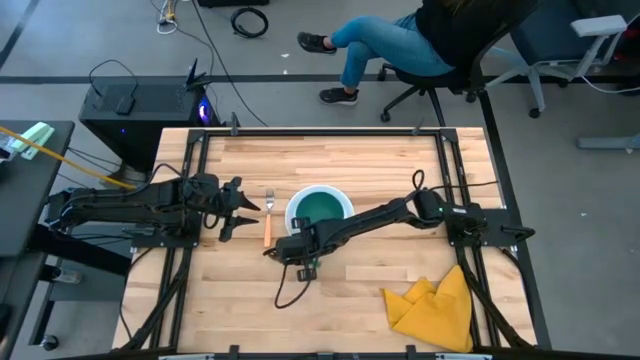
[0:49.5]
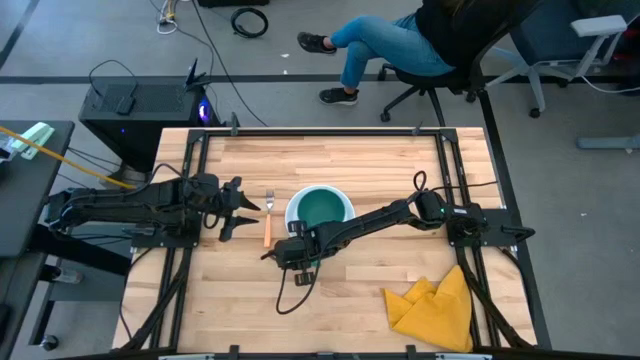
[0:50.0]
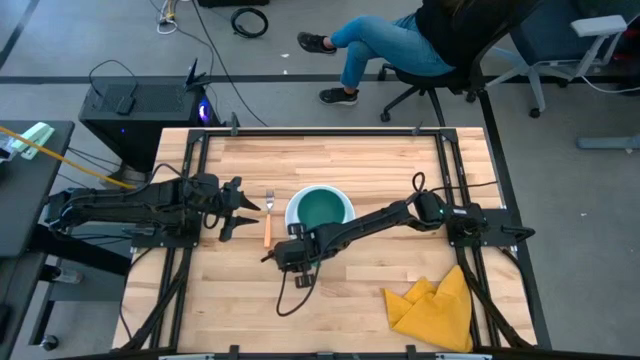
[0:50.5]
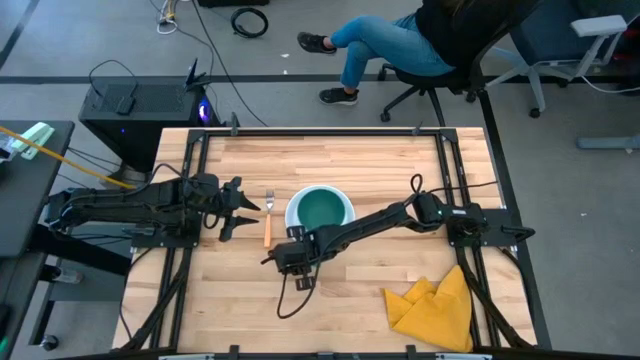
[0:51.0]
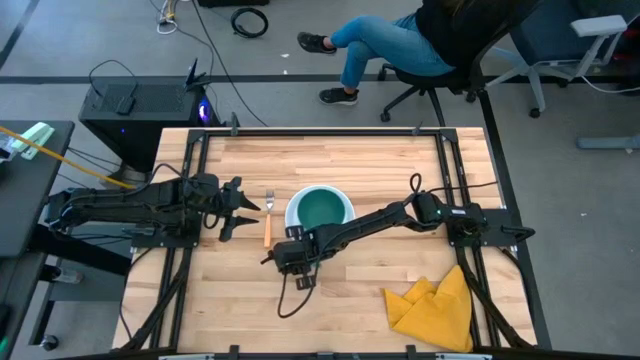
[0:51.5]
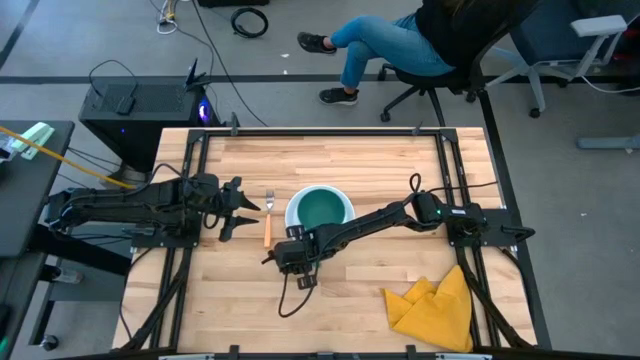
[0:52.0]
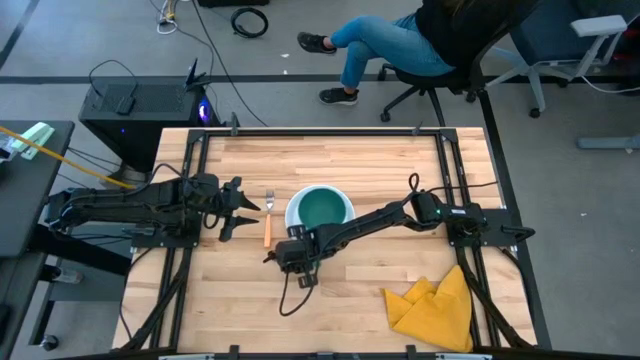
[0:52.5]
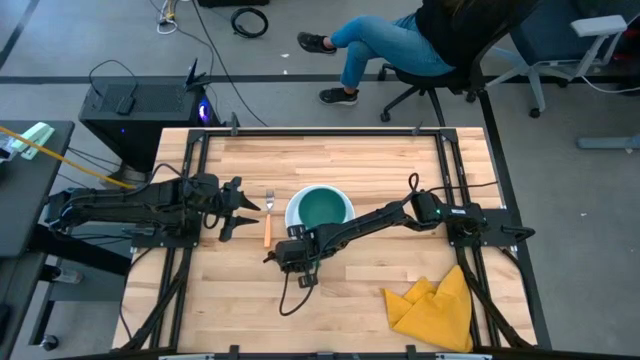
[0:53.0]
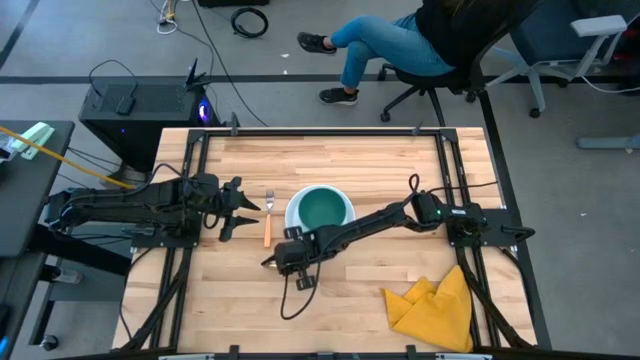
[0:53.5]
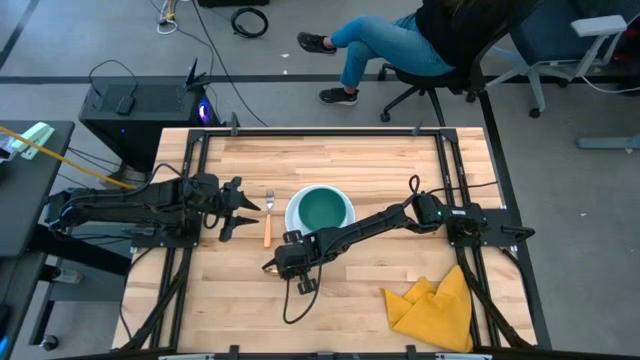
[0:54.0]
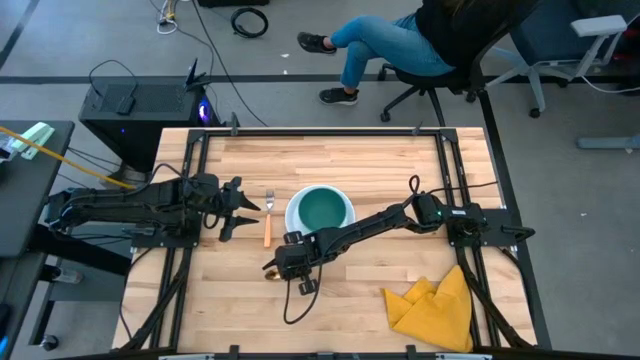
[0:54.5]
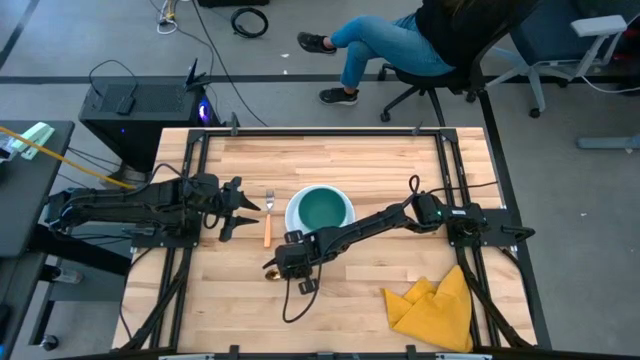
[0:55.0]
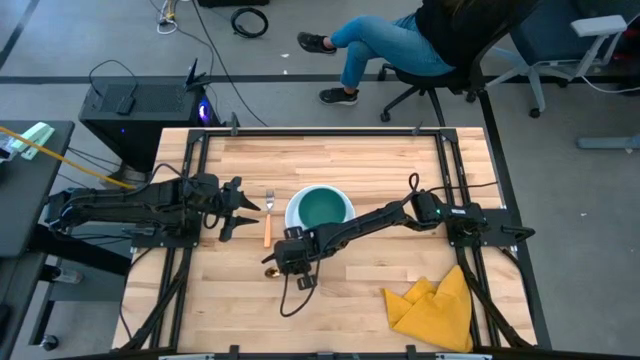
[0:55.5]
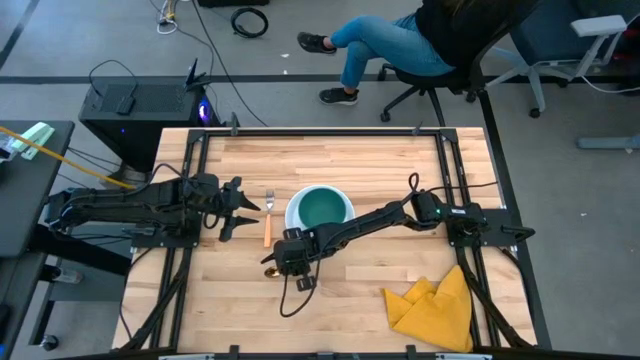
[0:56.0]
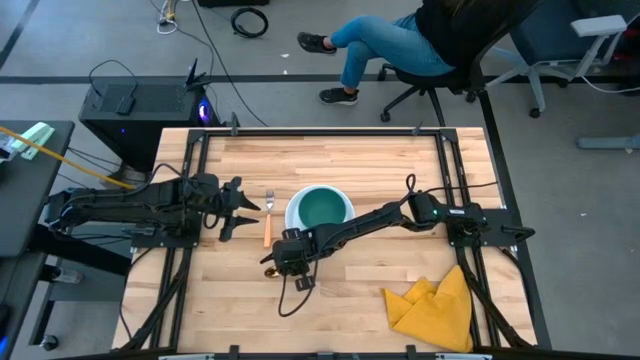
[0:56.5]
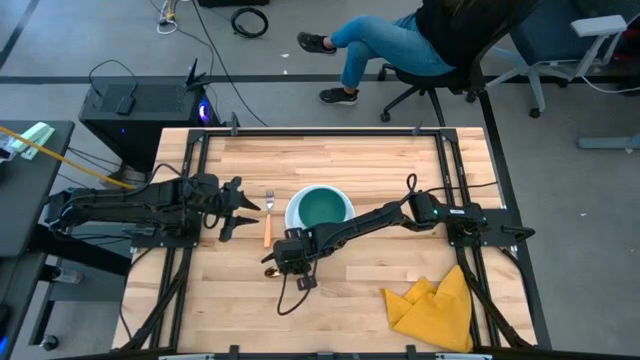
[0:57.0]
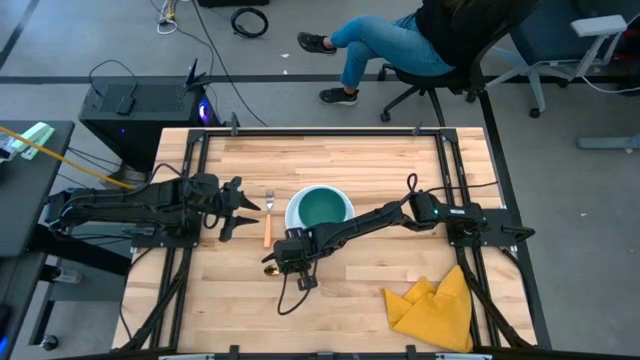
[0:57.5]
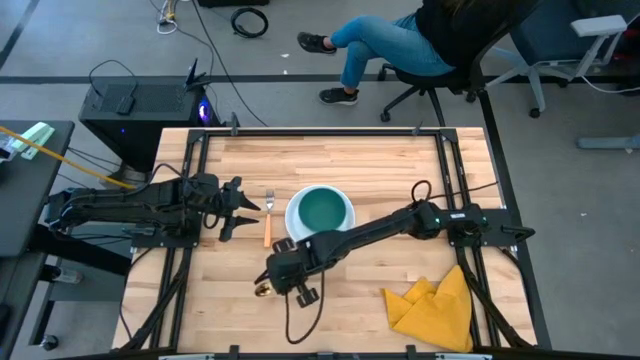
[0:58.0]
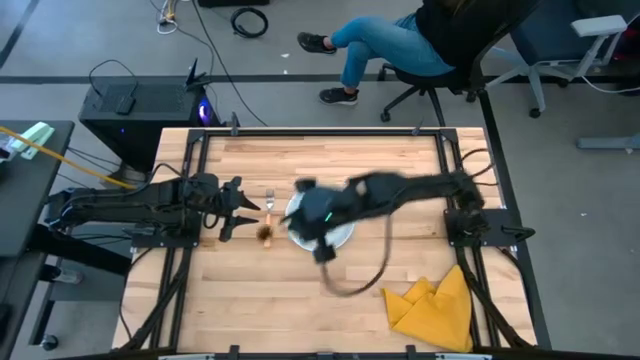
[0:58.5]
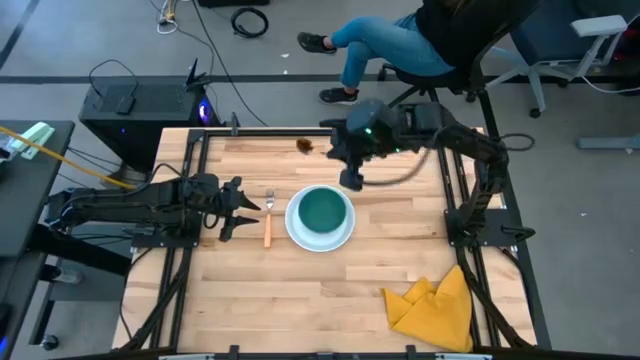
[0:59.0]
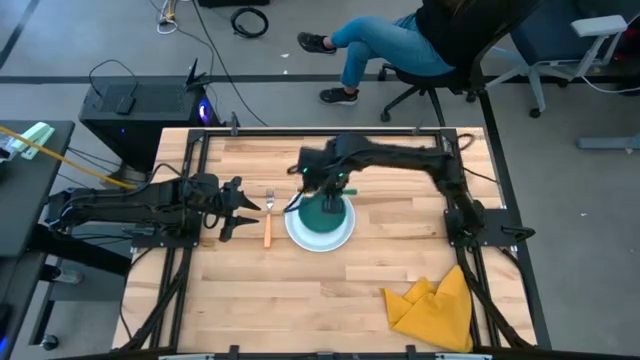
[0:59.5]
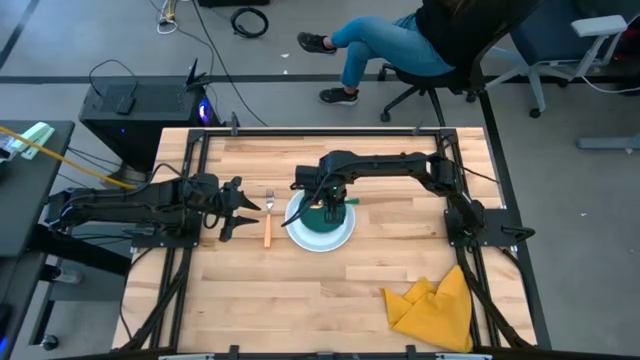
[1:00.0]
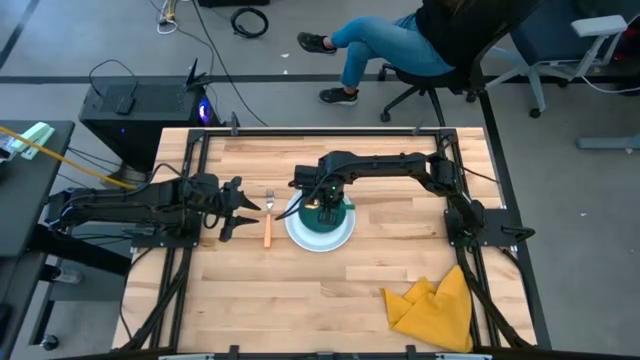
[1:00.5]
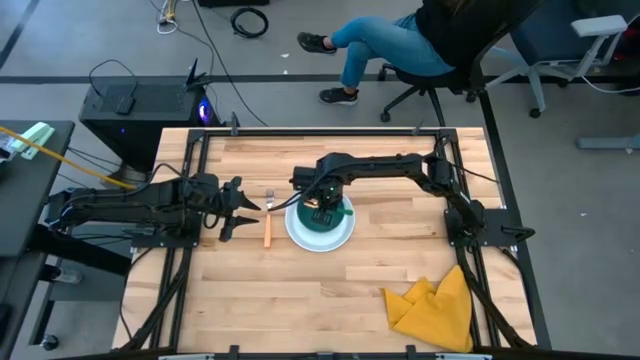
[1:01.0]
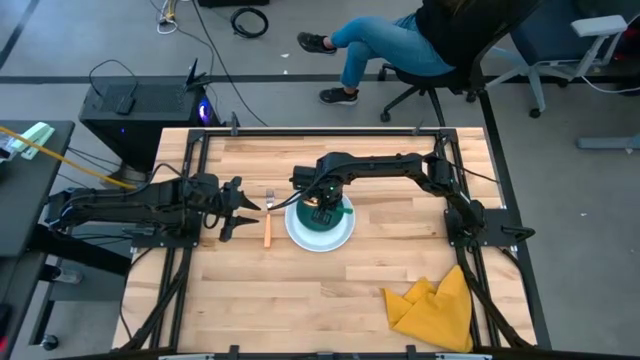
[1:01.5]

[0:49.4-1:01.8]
Task: Set table place
Put the green spoon into the green bowl

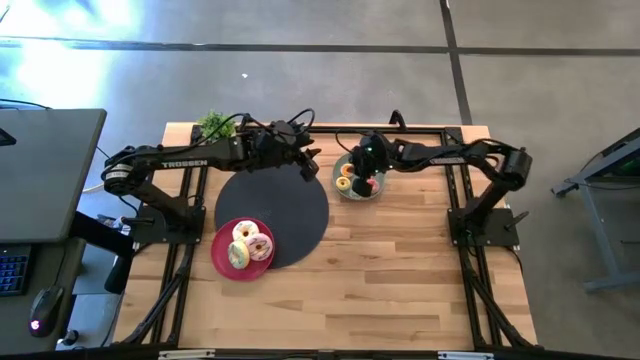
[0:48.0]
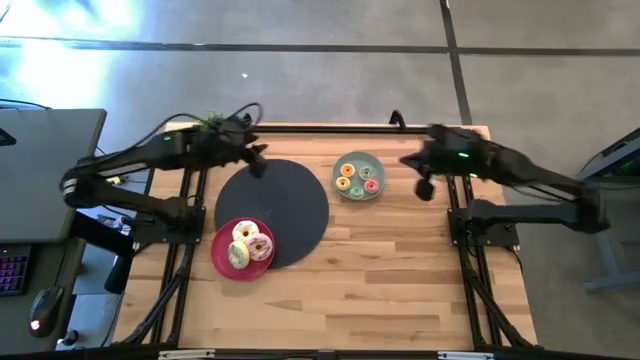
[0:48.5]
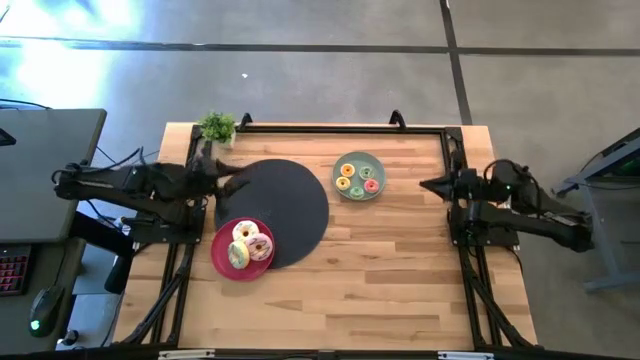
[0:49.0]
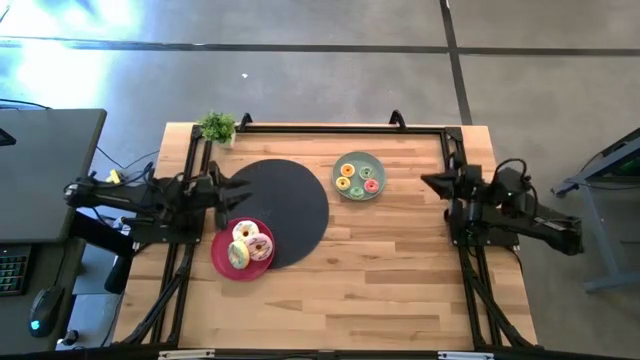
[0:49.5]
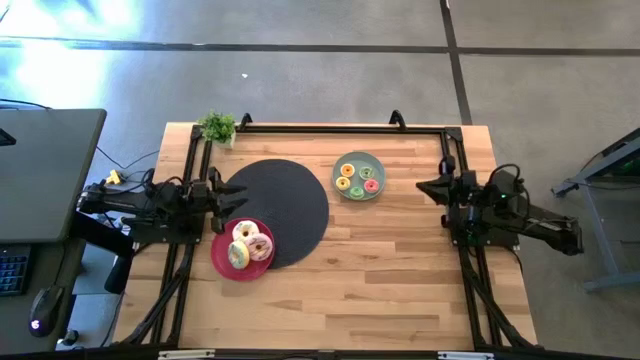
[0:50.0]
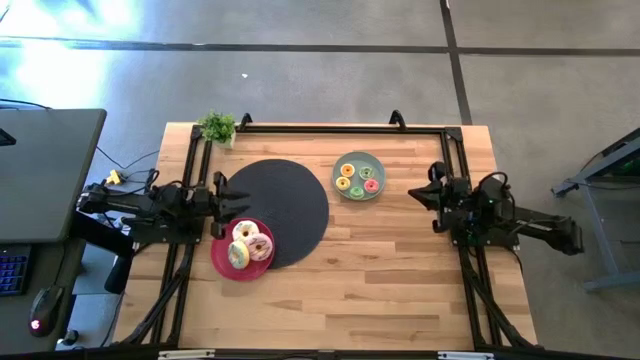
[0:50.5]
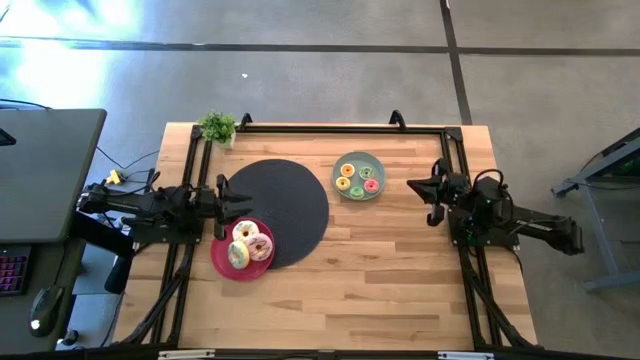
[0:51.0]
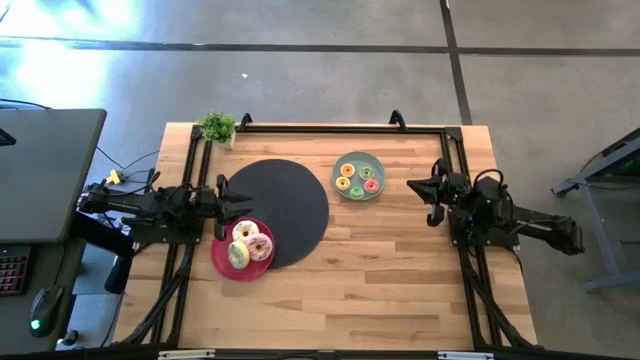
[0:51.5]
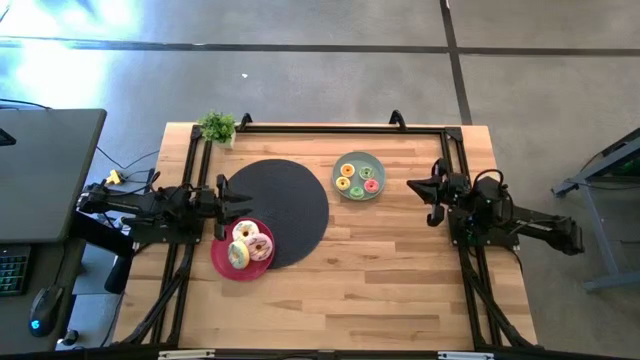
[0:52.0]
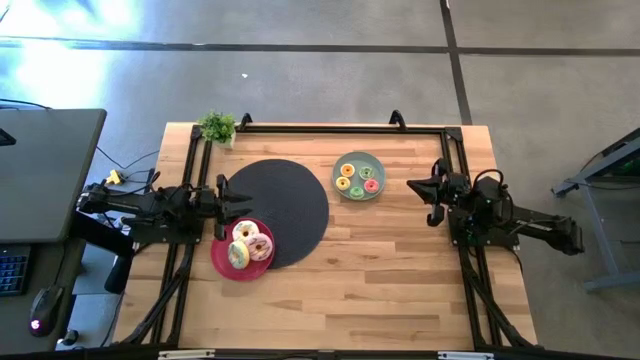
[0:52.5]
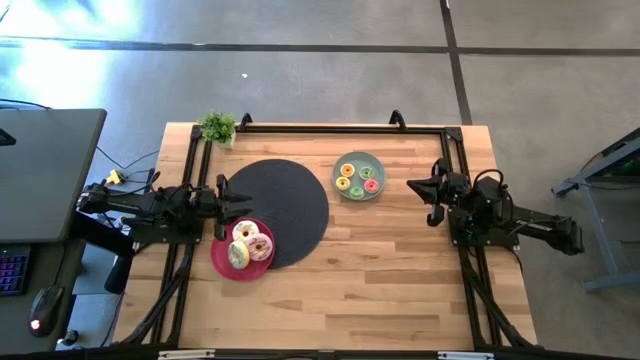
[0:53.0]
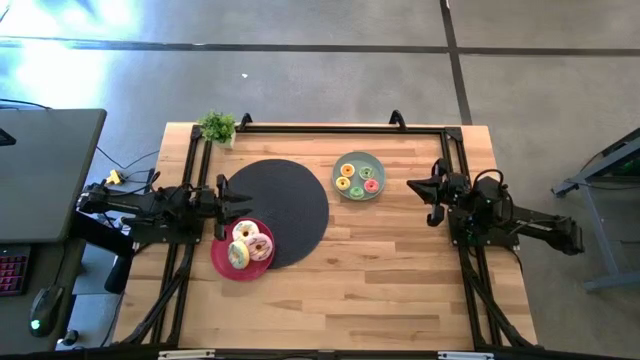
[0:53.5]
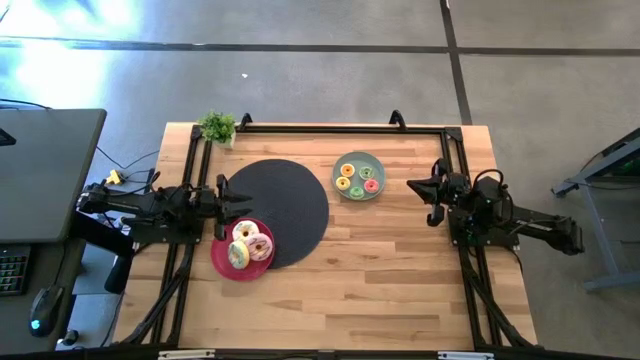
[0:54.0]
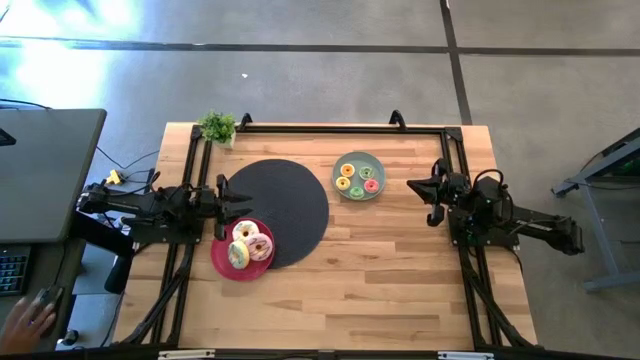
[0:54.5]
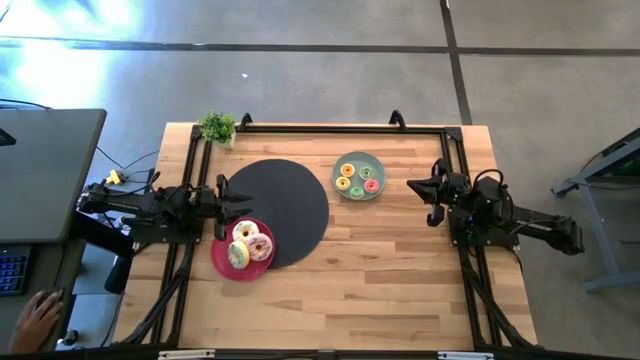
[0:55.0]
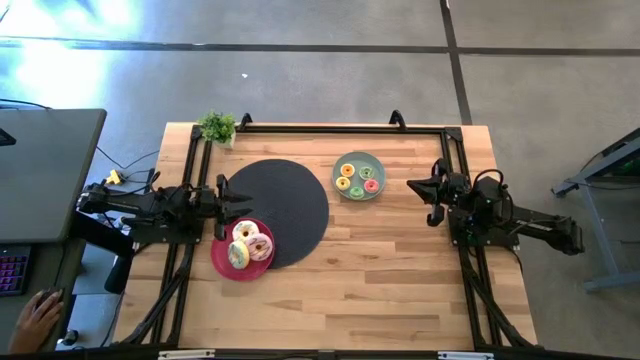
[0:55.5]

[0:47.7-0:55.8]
Task: Pick & Place donuts
Return to Home Position
